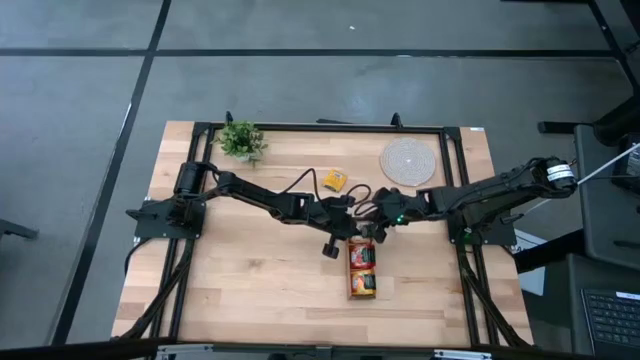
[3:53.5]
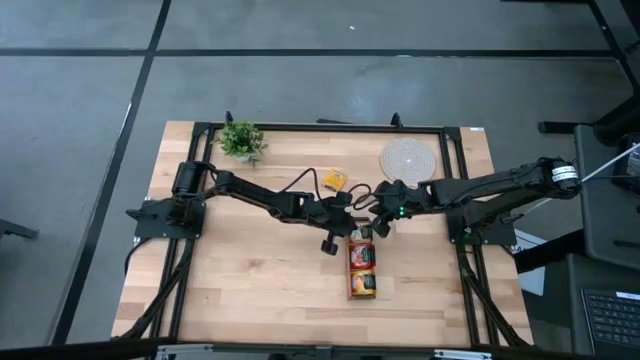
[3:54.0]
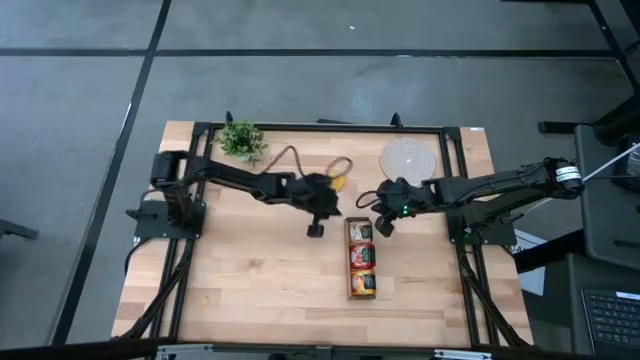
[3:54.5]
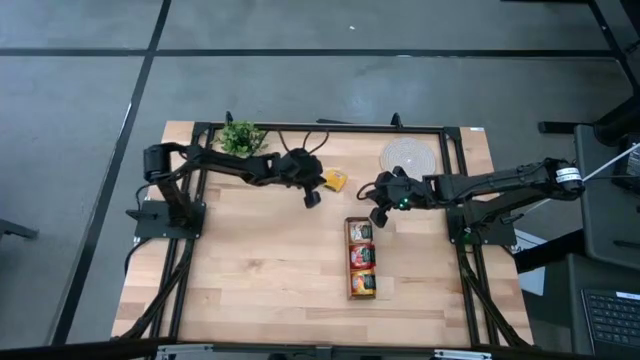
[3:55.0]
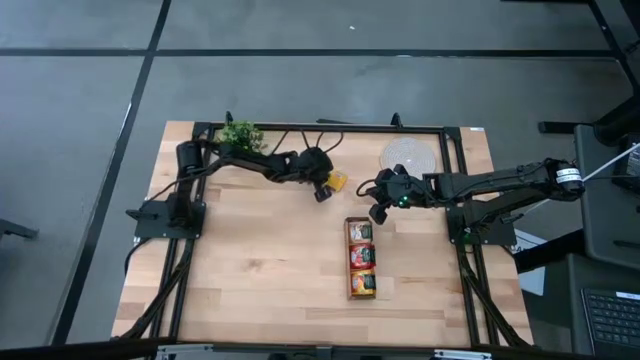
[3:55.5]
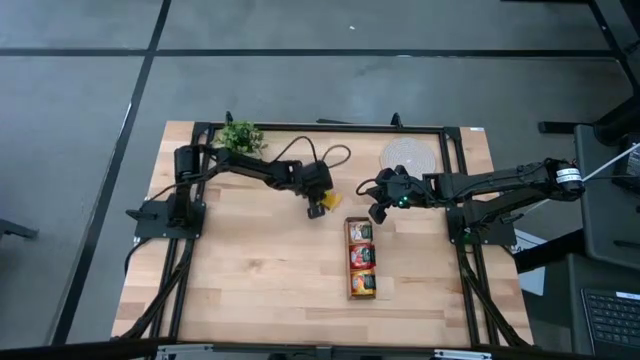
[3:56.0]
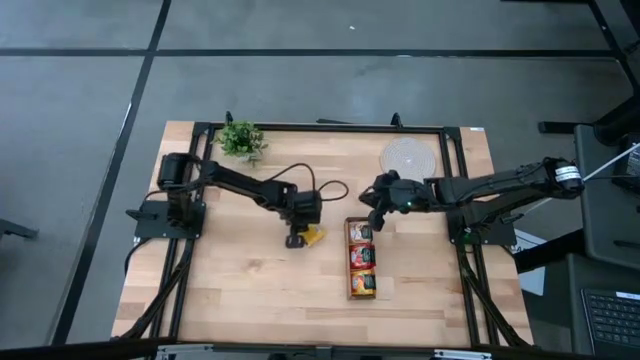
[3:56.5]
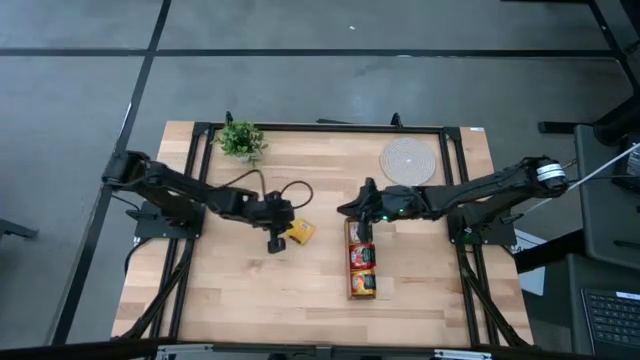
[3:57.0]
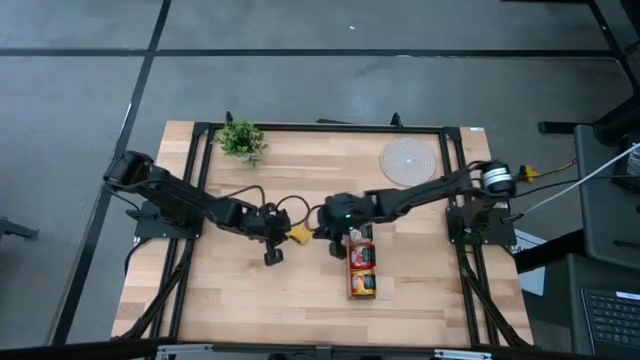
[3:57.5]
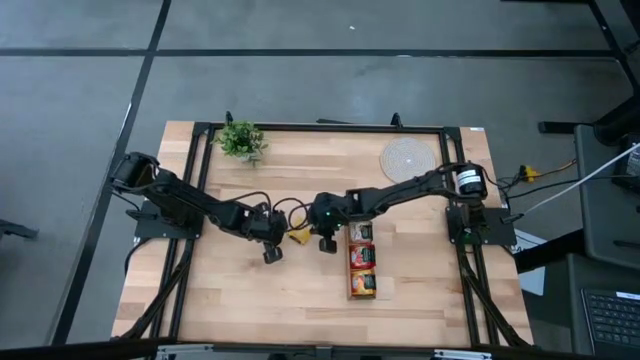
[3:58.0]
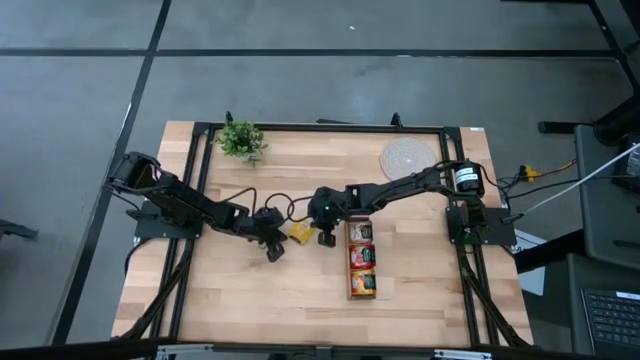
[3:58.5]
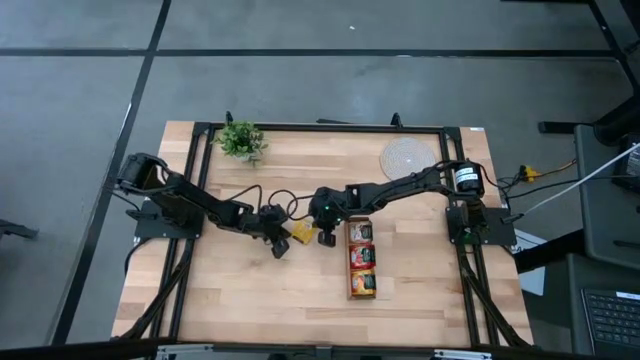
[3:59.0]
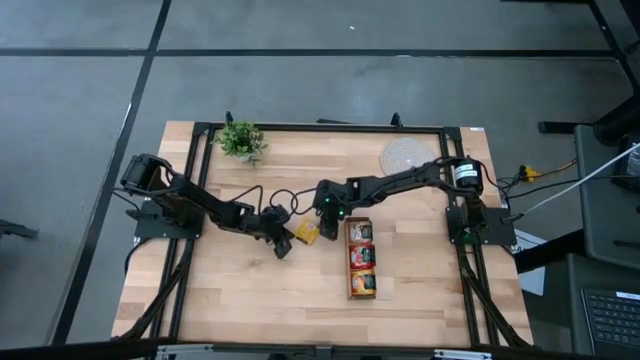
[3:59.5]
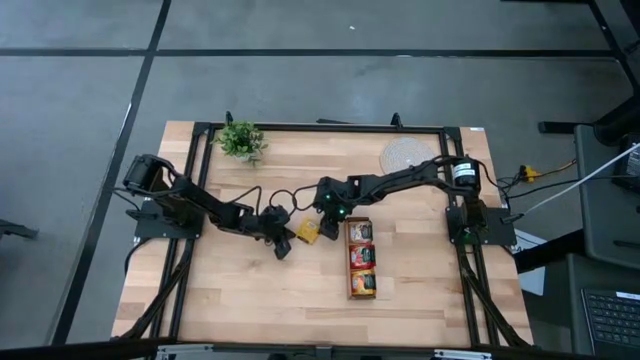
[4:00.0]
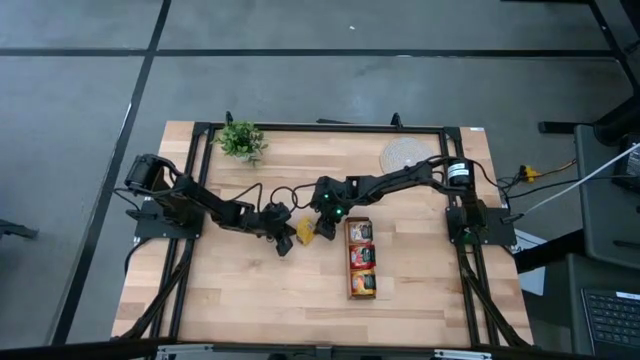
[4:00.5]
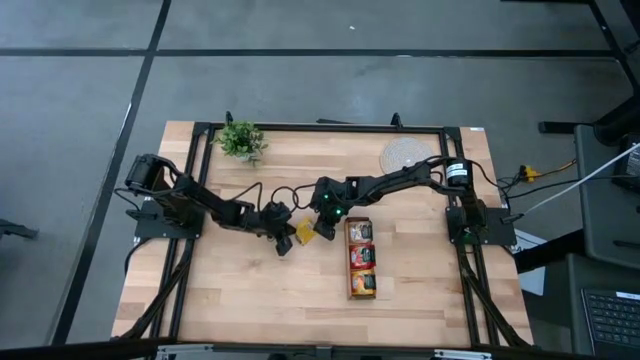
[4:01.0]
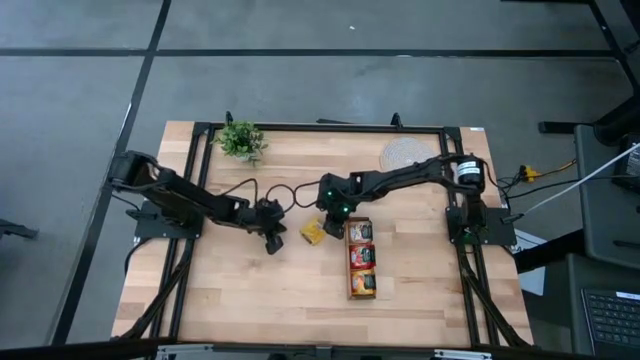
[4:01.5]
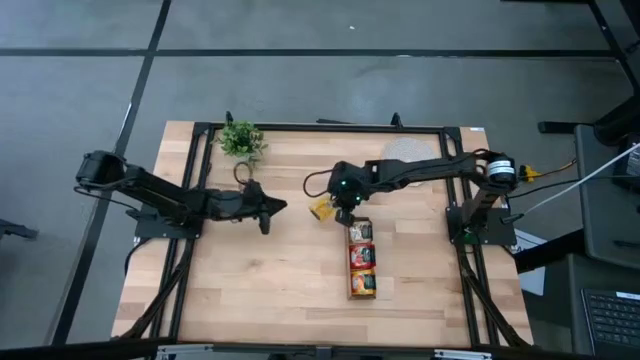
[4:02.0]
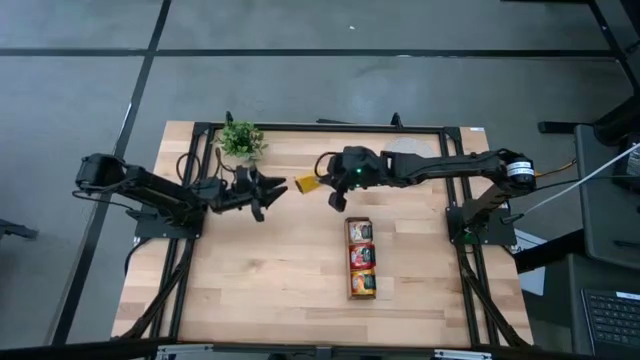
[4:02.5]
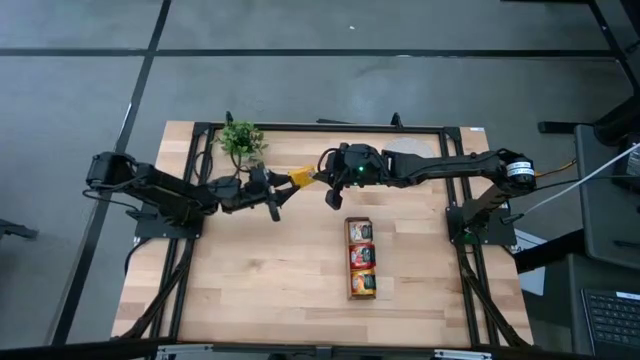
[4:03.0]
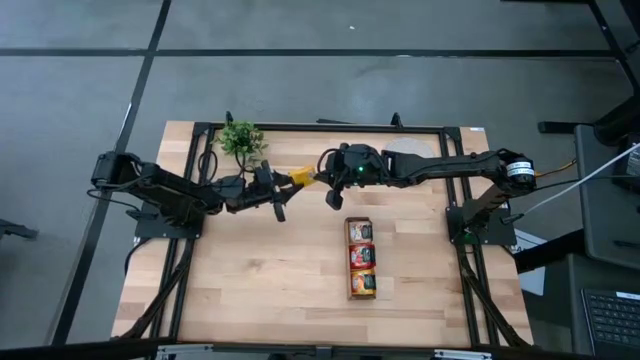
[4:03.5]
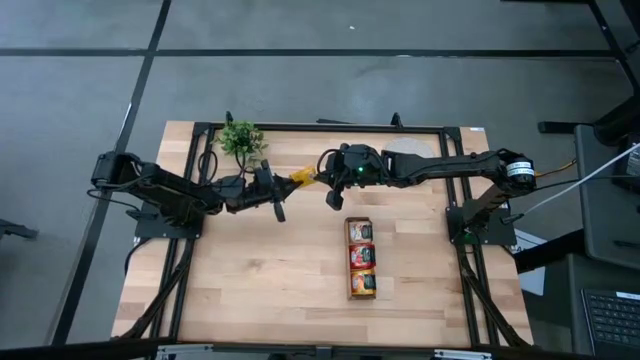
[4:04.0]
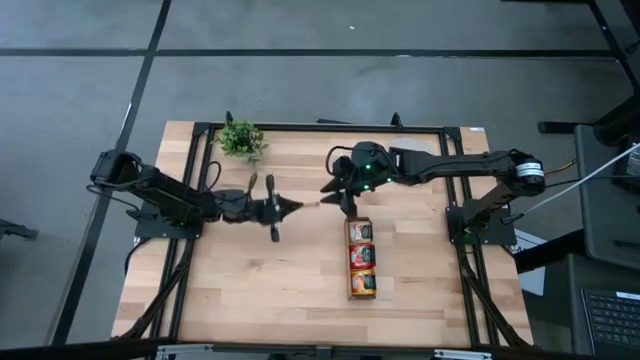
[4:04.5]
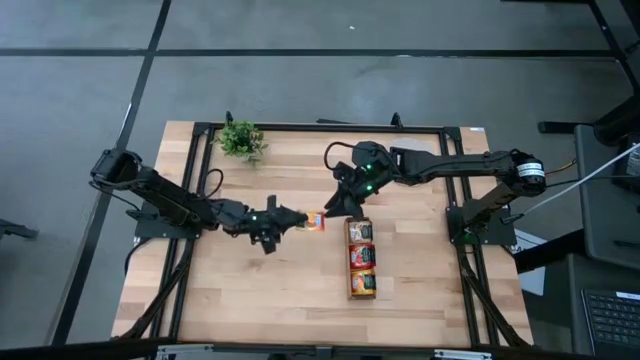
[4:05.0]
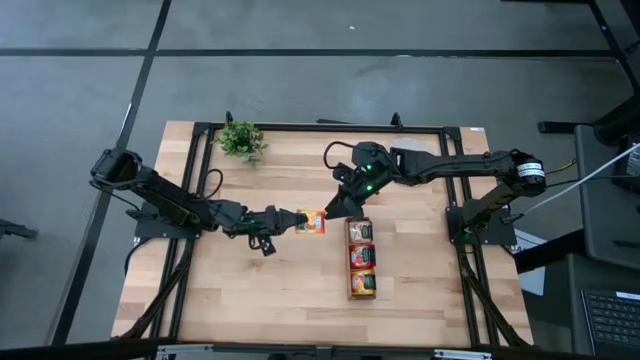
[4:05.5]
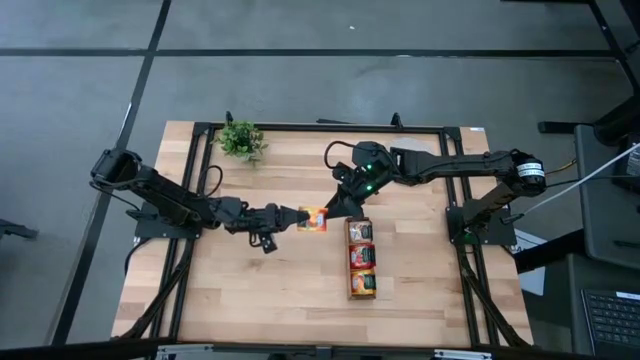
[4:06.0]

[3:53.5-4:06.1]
Task: Pick & Place Tea
Put the yellow tea bag into the right section of the wooden organizer

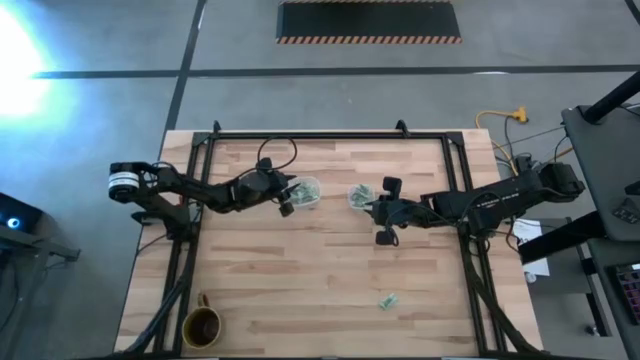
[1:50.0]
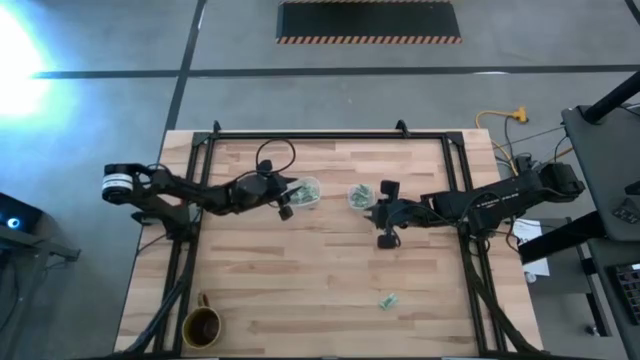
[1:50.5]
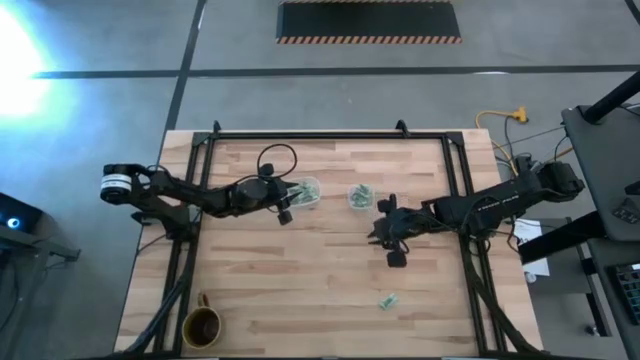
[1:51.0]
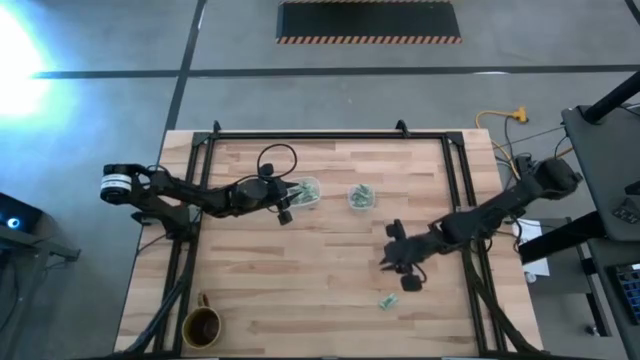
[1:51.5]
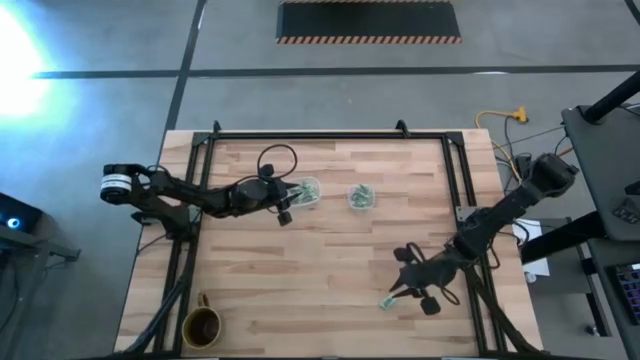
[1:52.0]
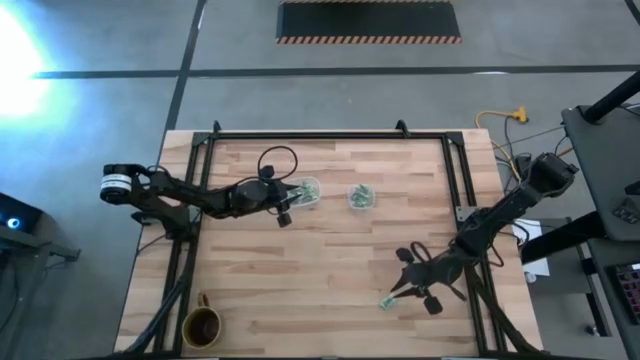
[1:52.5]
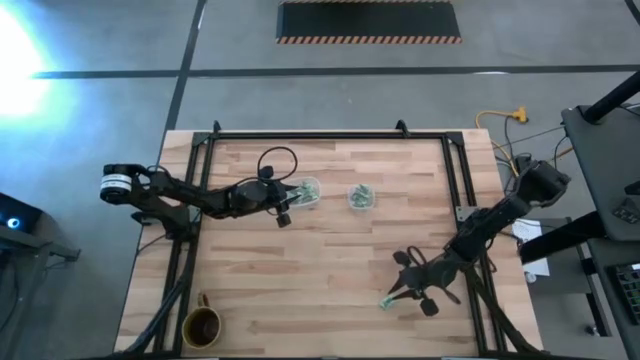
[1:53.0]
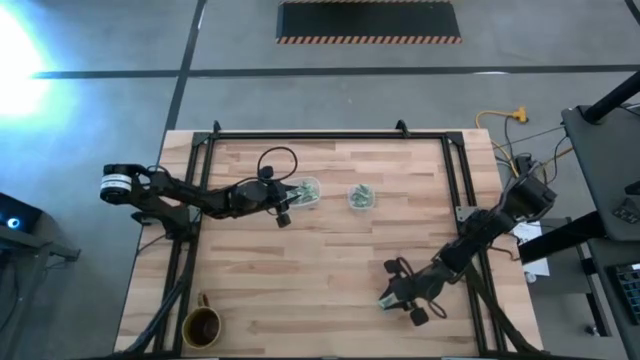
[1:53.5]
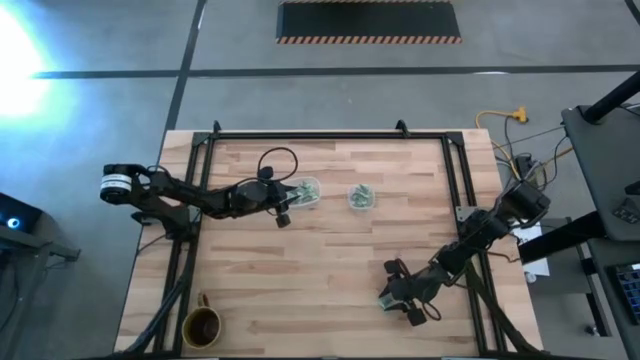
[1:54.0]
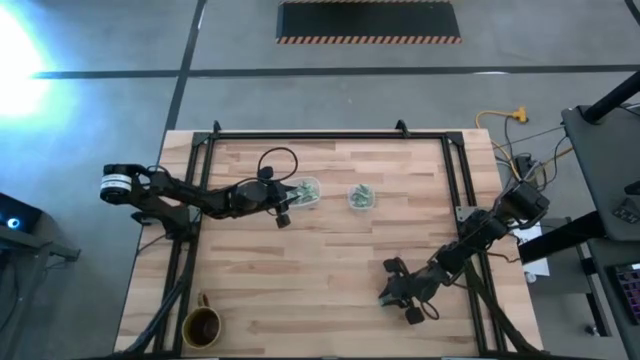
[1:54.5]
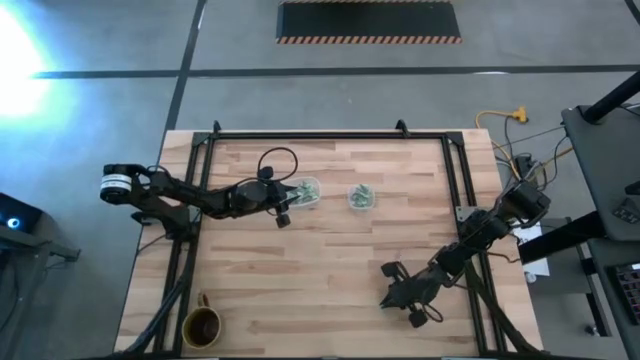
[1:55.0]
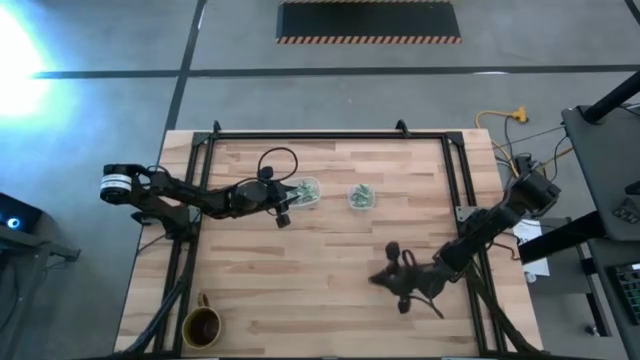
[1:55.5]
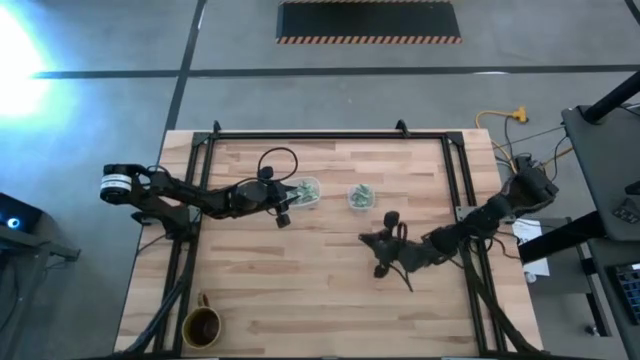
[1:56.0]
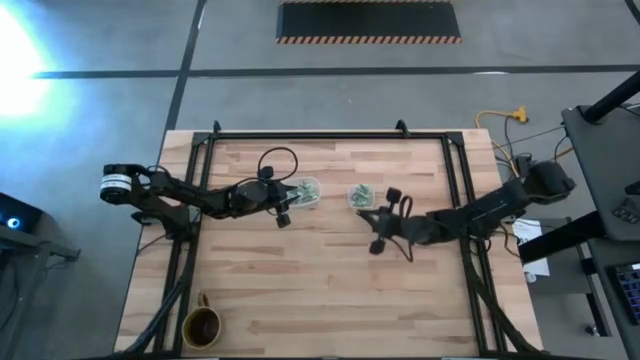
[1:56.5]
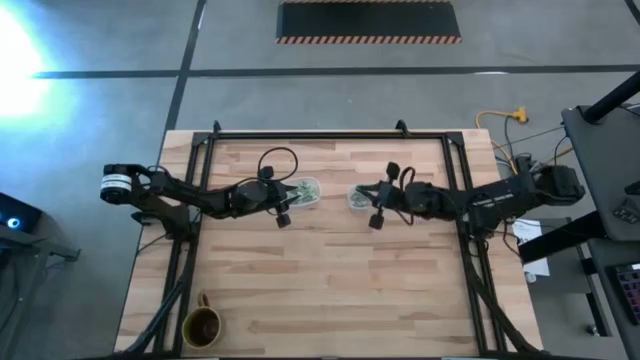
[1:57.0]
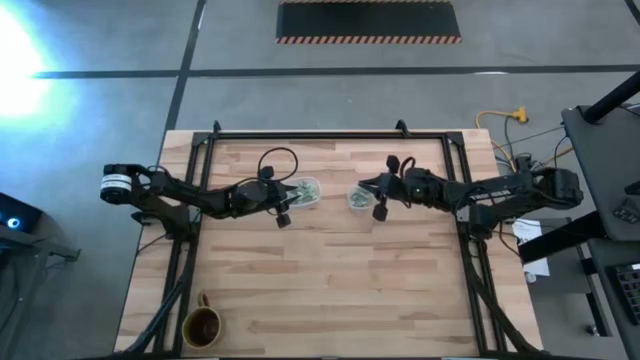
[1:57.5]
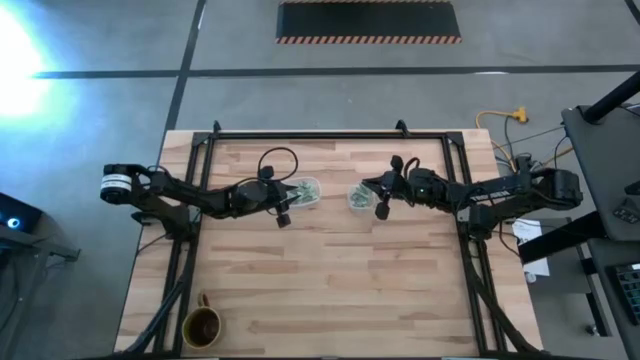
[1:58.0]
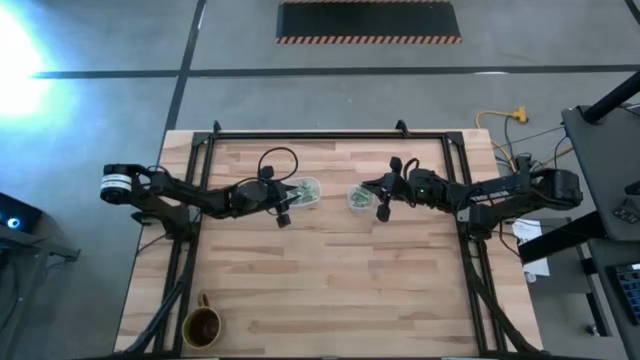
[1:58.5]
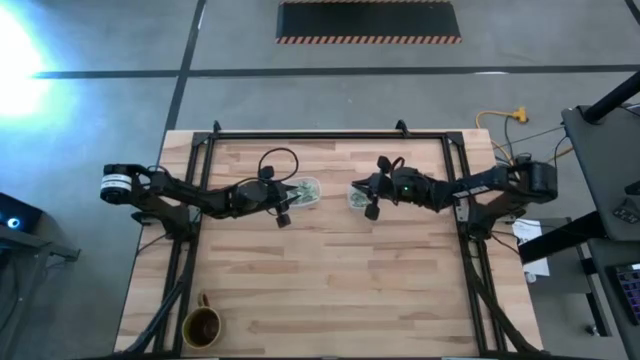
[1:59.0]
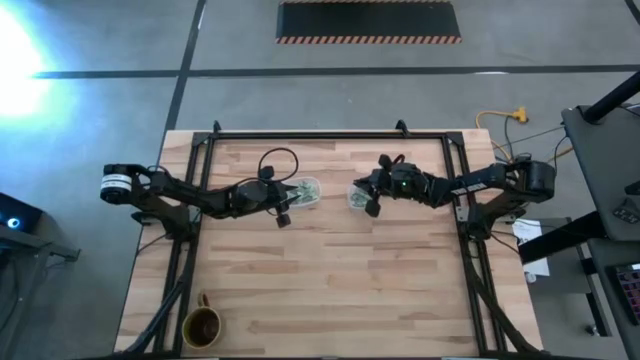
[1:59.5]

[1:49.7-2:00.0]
Task: Pick and place Stevia / Truvia into bins
Put the stevia packet into the transparent square container
